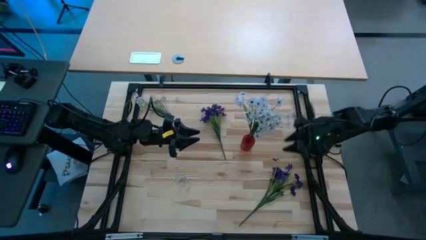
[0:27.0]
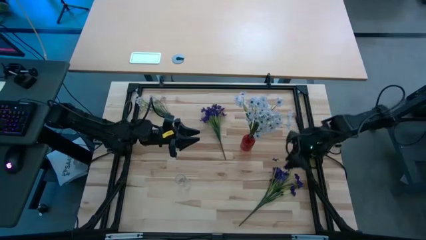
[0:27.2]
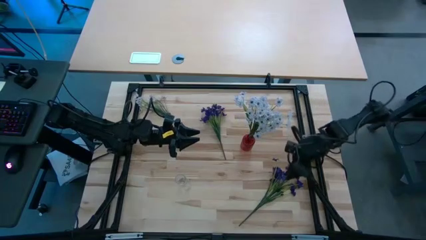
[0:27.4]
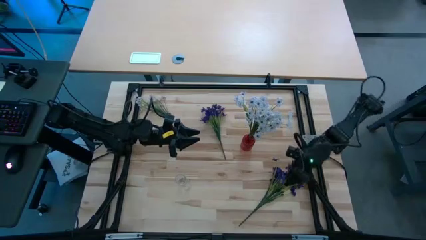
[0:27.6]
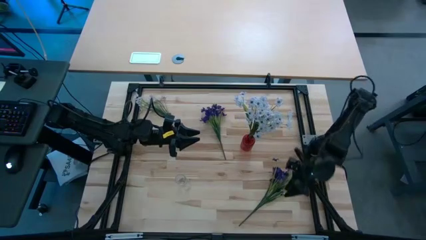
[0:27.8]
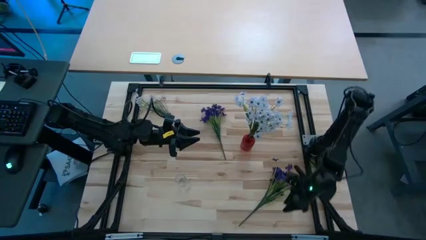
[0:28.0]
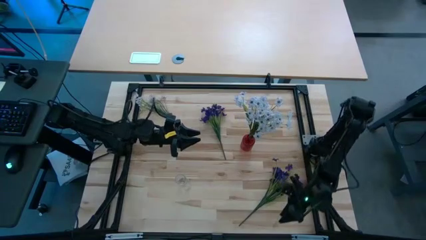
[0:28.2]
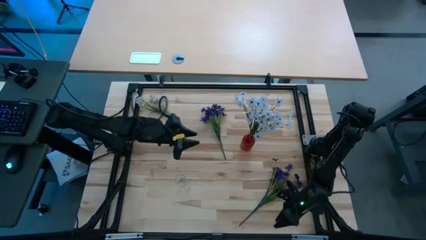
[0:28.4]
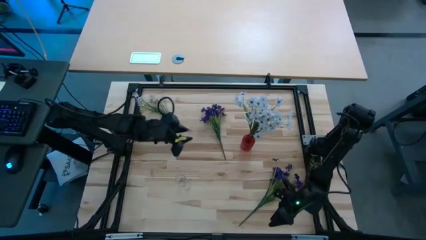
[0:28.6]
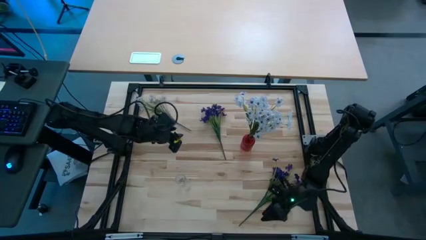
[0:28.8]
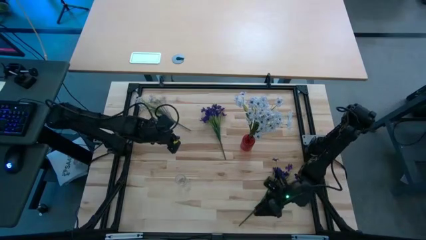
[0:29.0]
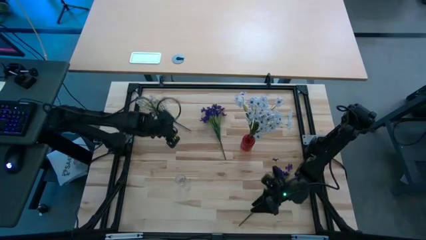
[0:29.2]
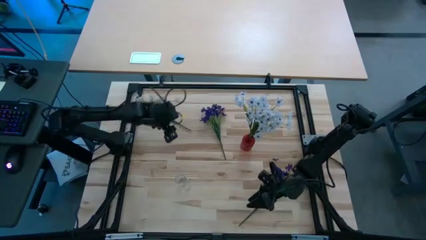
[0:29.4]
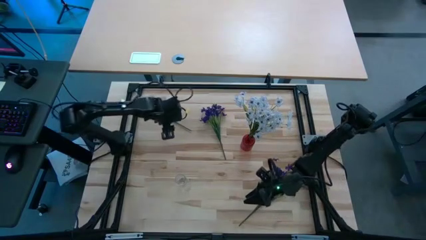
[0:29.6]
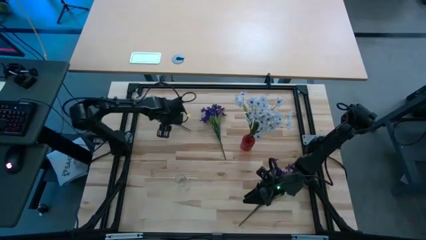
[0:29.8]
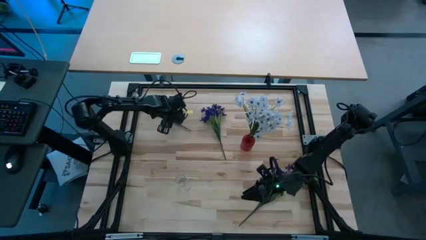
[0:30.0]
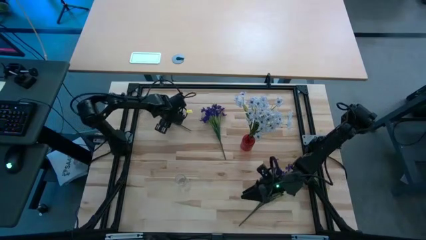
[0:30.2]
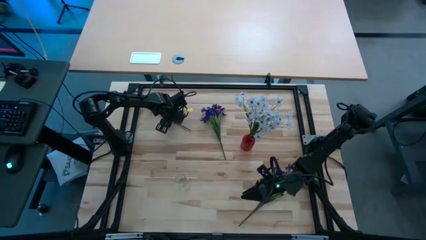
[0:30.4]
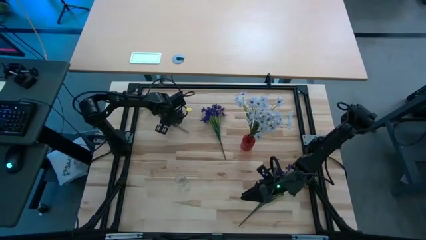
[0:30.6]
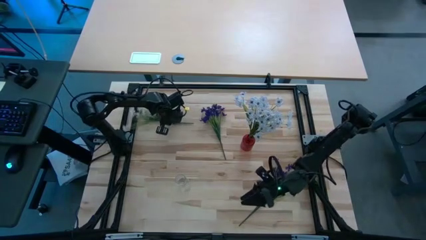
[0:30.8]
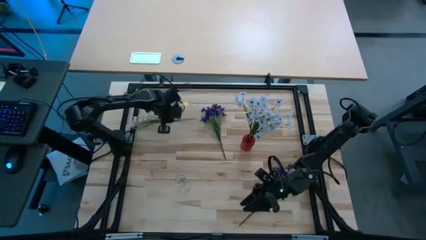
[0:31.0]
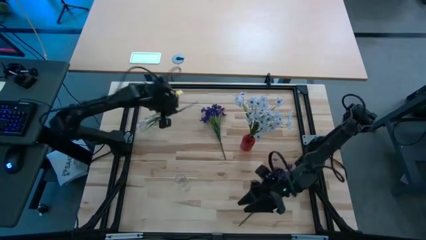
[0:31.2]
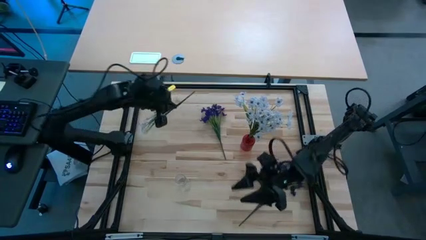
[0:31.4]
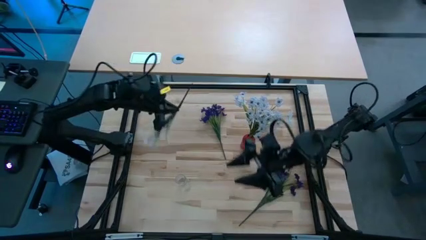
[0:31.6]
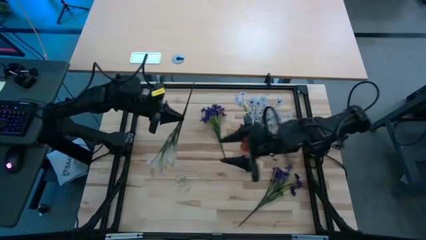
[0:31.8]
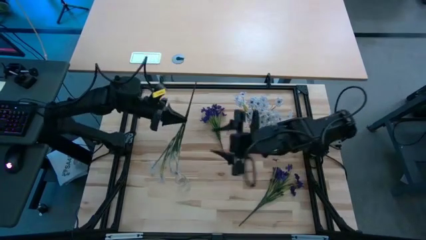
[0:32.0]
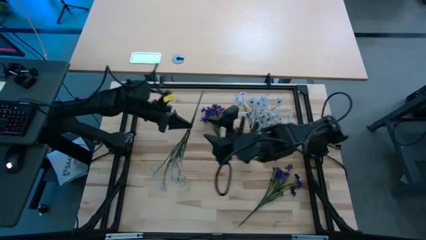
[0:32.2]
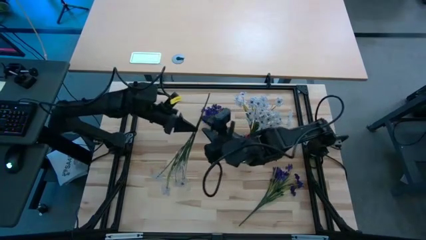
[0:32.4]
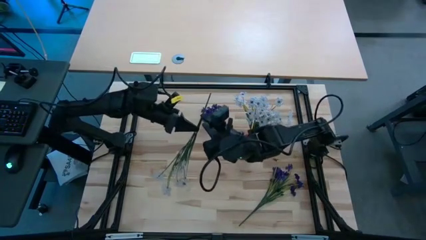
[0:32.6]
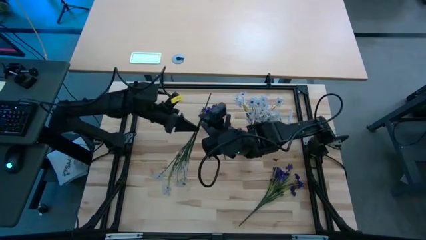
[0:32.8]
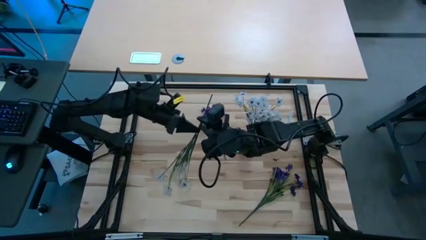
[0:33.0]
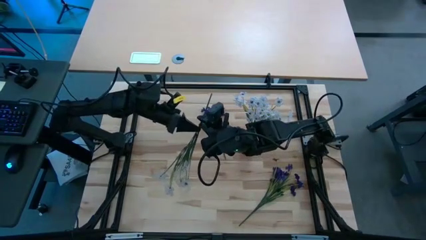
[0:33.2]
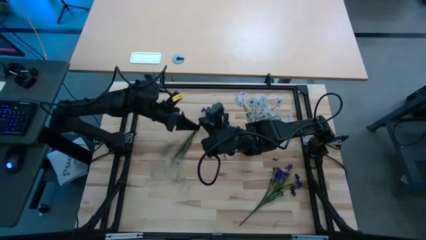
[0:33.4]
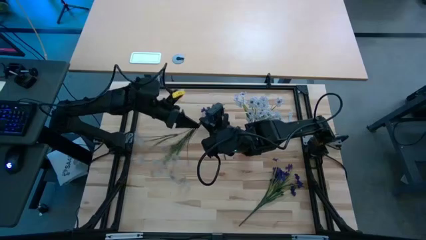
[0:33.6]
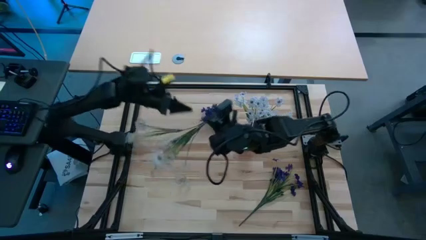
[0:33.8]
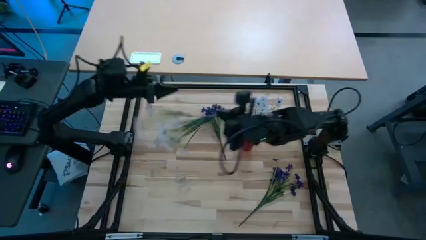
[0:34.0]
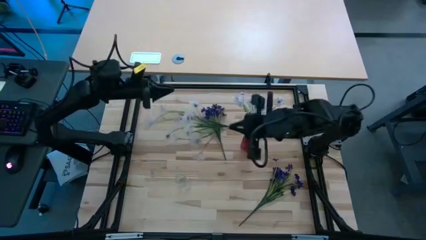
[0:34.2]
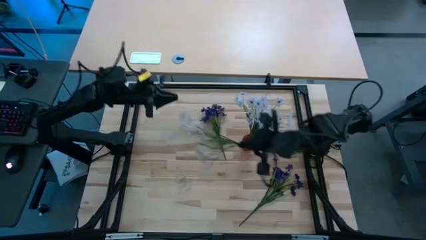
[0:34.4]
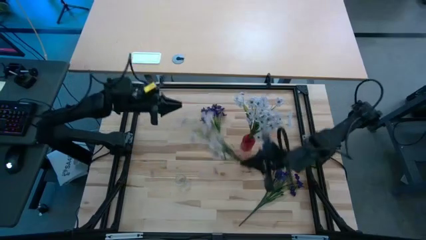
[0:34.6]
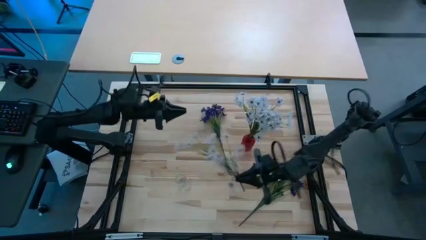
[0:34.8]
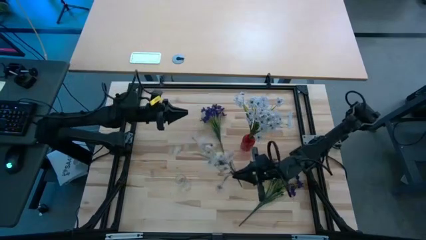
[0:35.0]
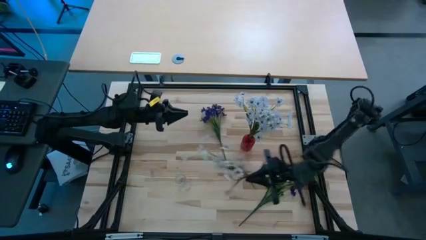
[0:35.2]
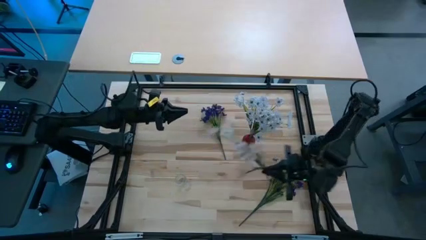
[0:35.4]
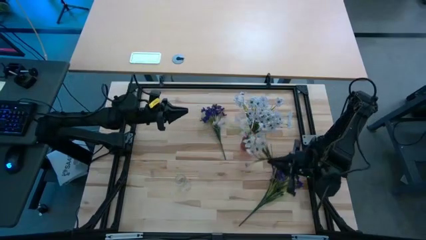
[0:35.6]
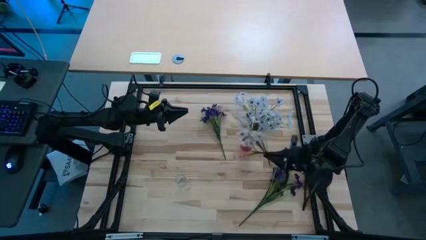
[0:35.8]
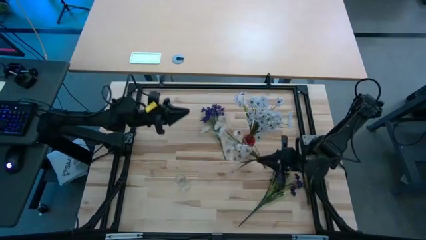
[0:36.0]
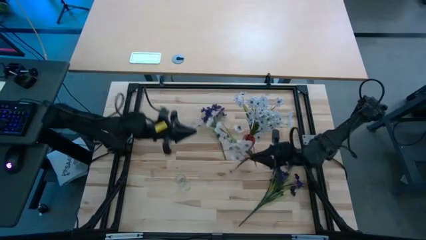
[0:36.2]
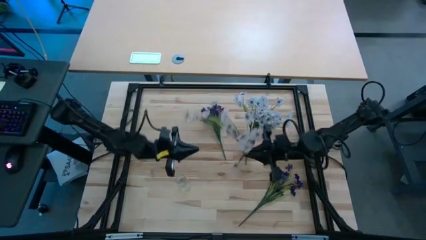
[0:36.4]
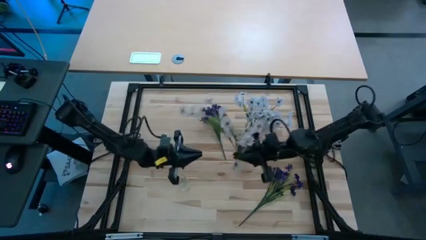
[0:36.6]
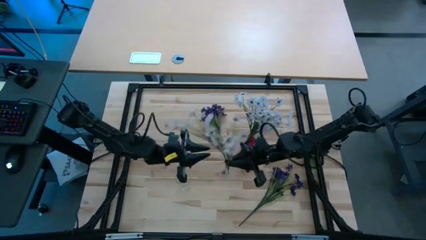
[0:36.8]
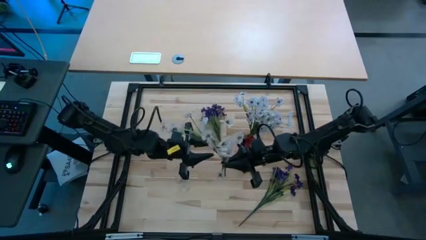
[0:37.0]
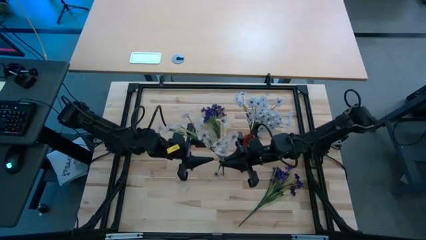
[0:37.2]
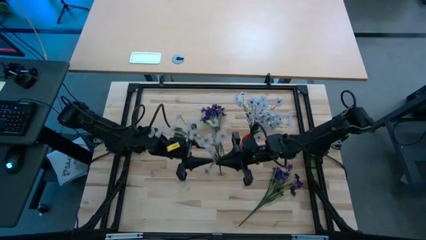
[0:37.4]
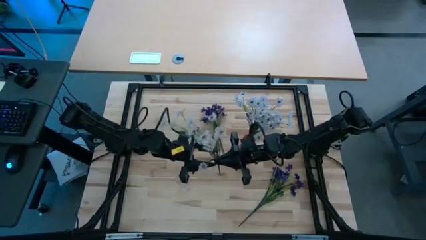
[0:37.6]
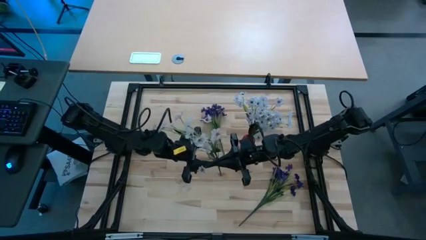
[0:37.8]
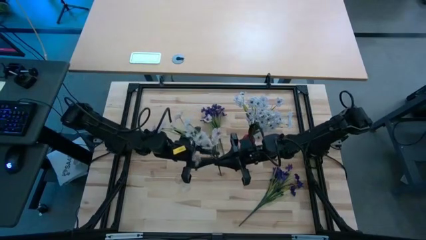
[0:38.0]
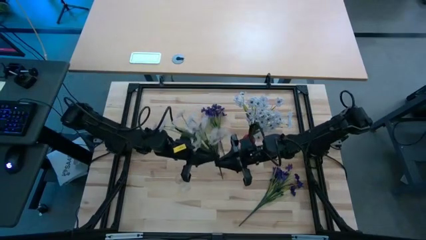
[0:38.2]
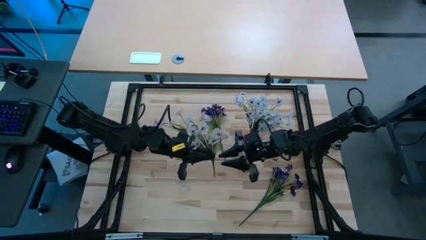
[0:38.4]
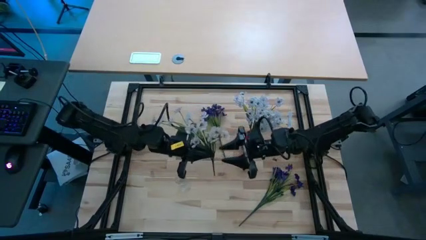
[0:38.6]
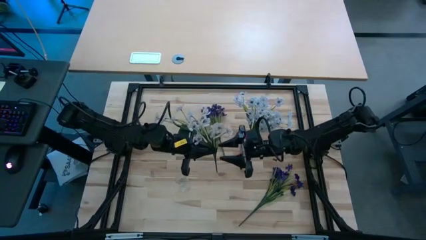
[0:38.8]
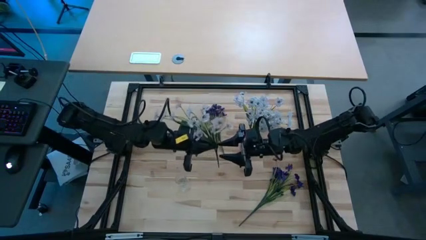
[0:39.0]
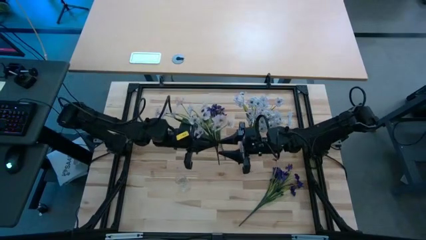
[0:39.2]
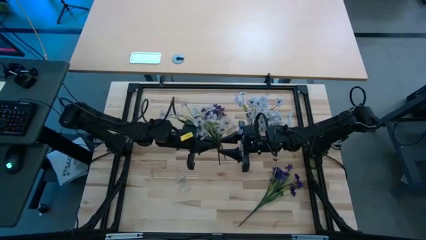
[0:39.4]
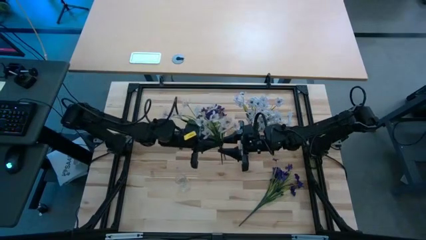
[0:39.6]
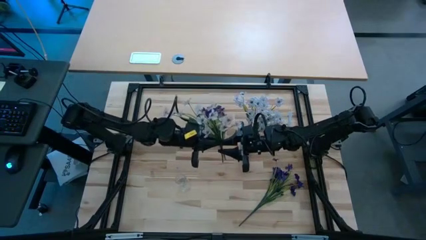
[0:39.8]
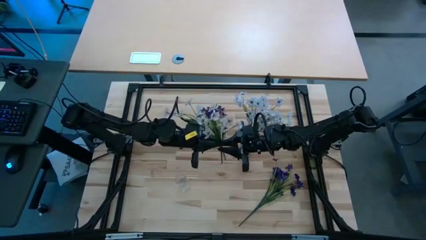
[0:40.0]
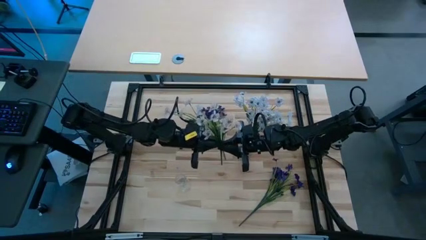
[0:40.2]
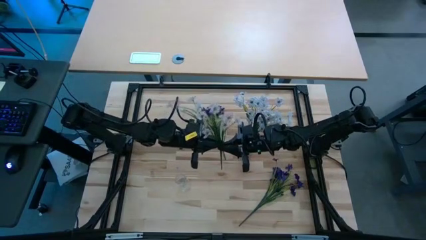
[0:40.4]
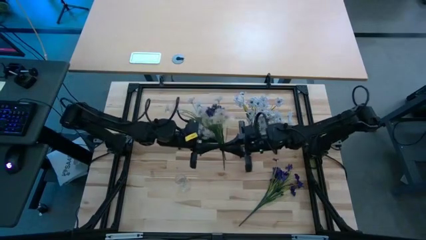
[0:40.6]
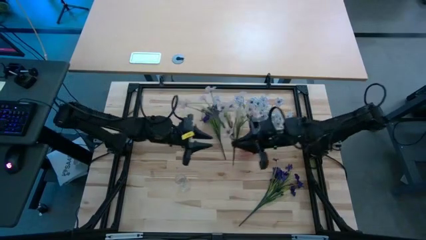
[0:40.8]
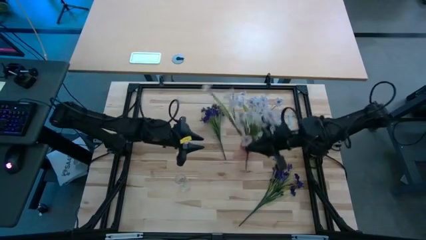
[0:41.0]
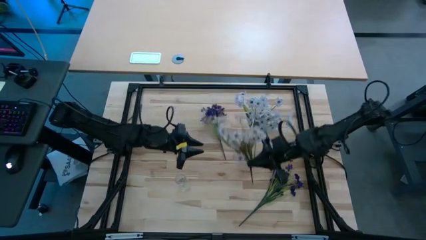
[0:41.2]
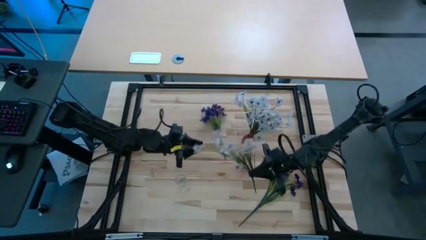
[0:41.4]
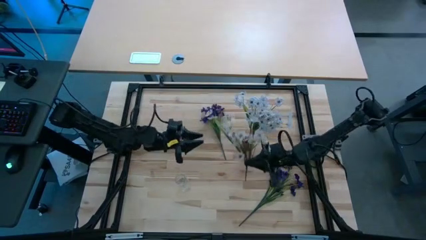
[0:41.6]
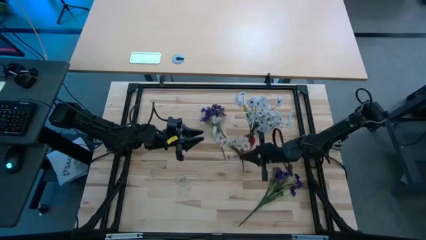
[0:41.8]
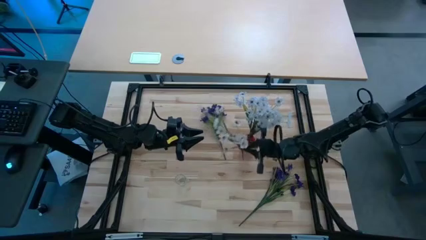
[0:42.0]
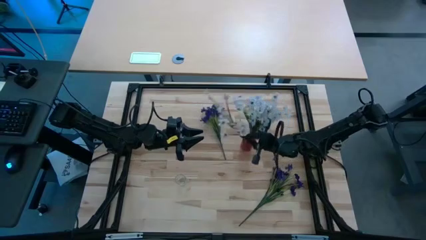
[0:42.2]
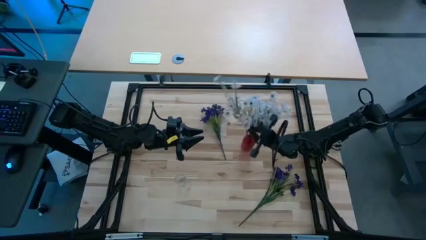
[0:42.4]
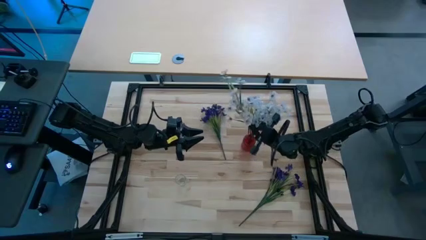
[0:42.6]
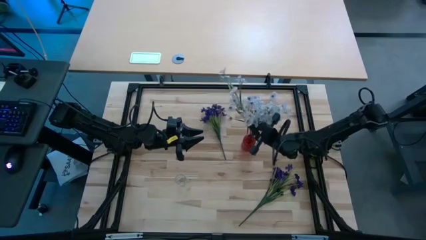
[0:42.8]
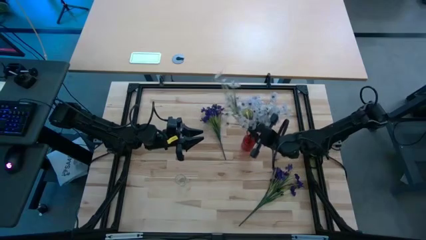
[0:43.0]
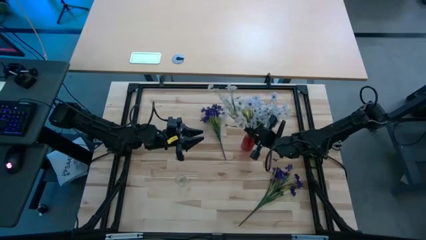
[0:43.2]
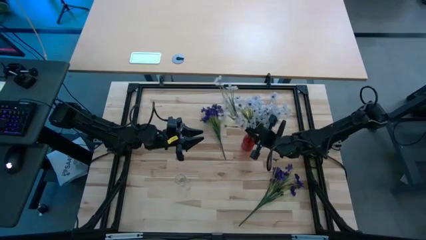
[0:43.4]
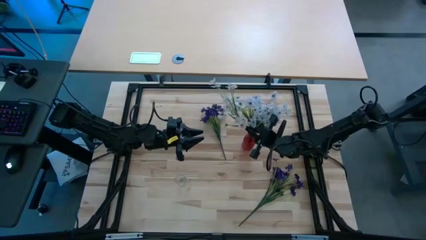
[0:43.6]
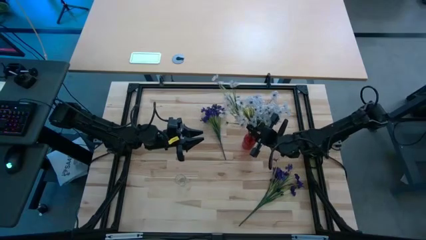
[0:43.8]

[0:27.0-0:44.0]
Task: Sort flowers into vase by color
Put the white flowers into the red vase
